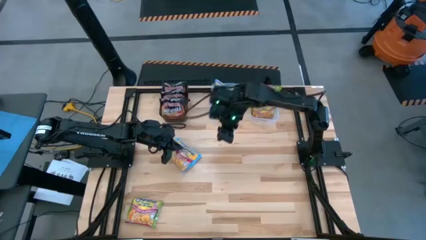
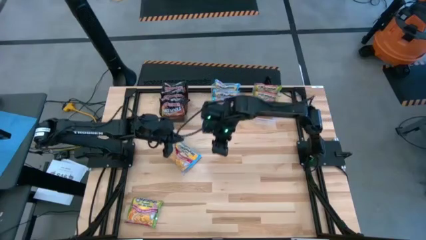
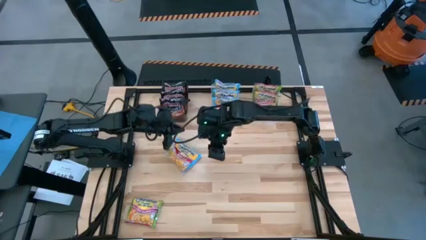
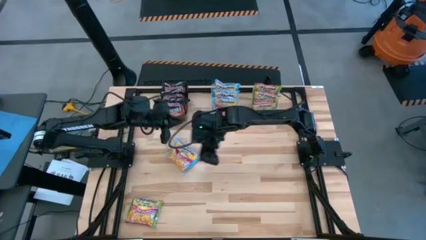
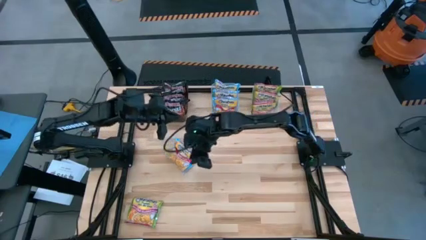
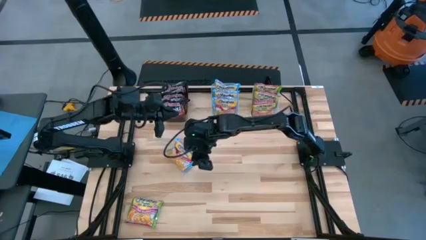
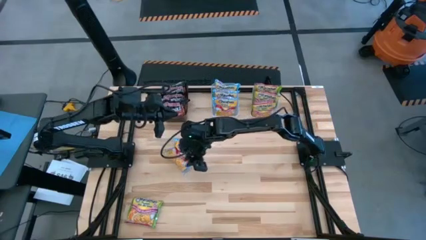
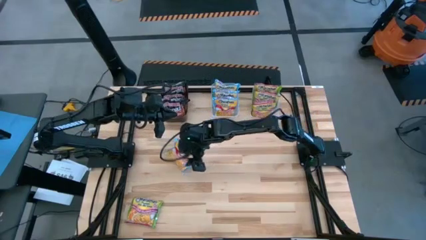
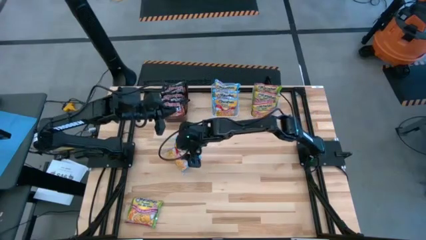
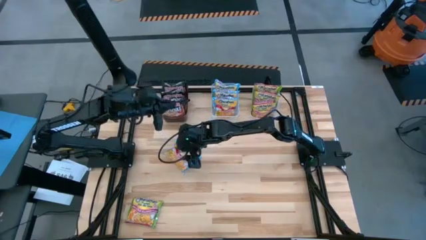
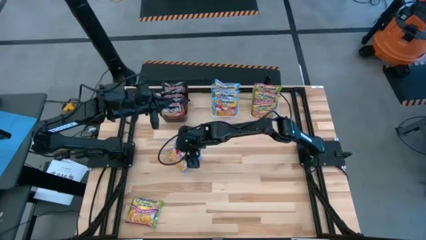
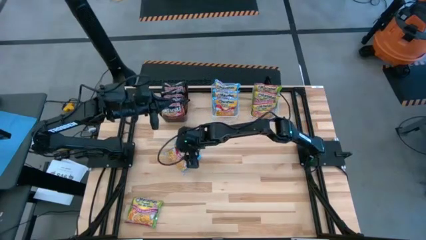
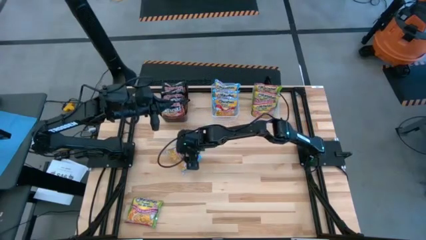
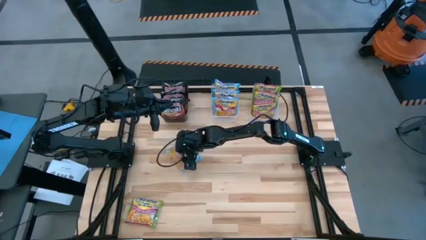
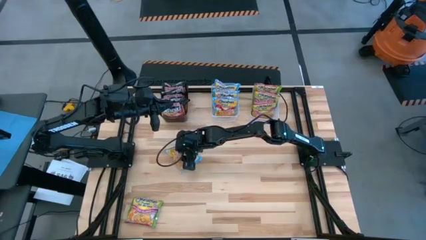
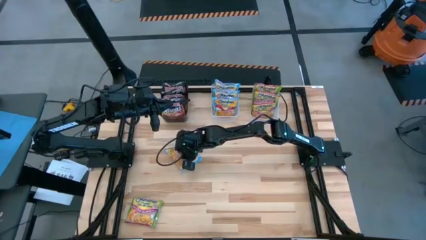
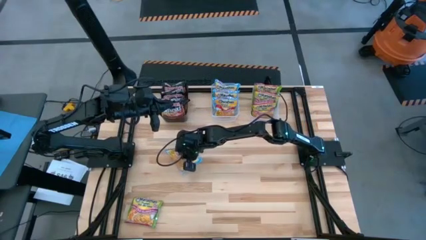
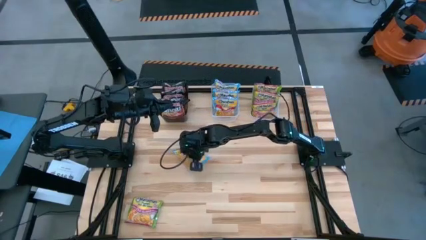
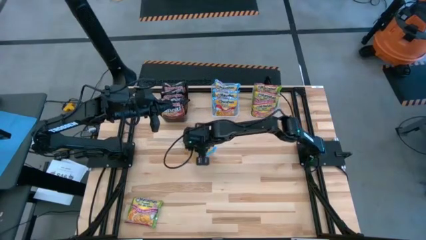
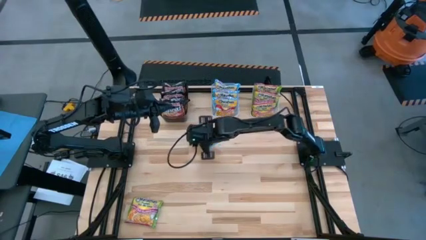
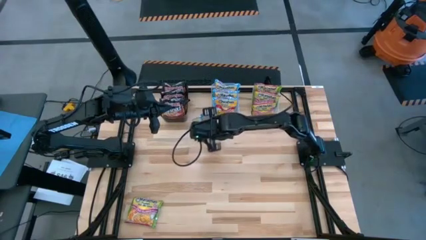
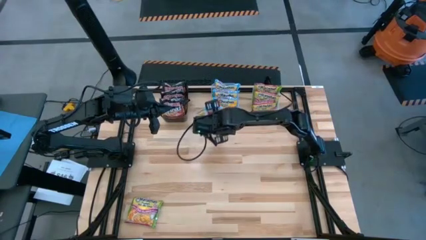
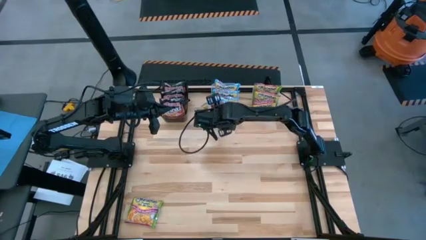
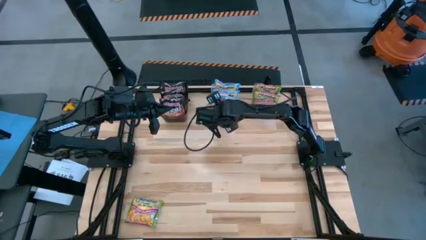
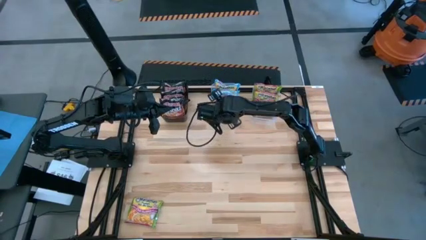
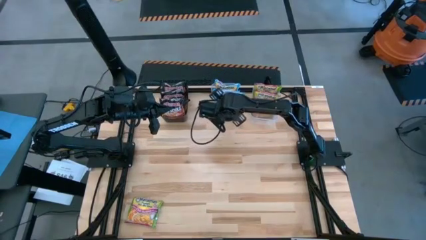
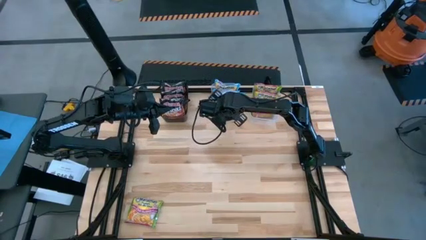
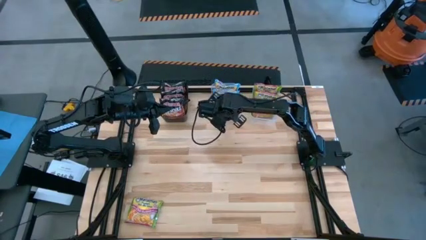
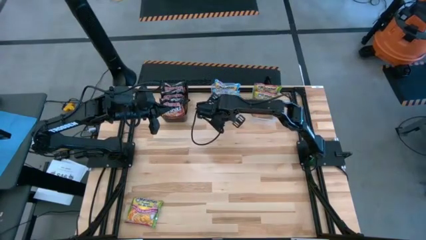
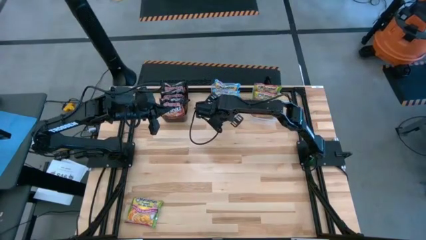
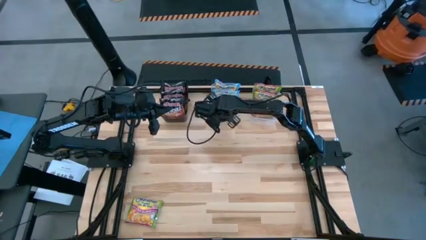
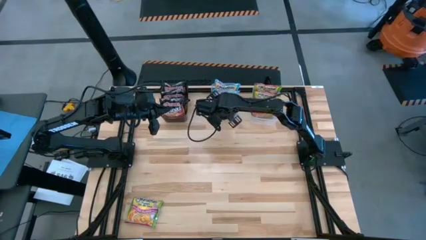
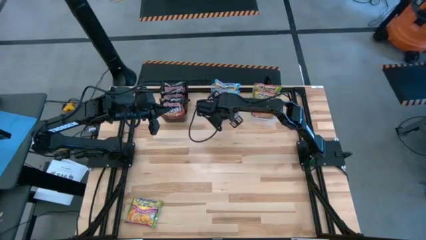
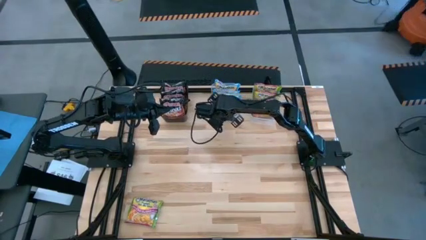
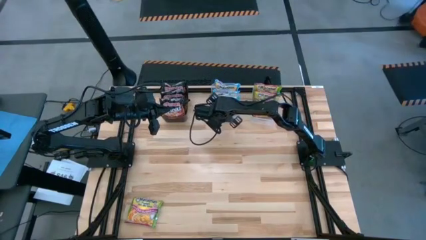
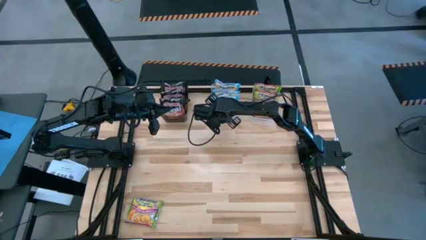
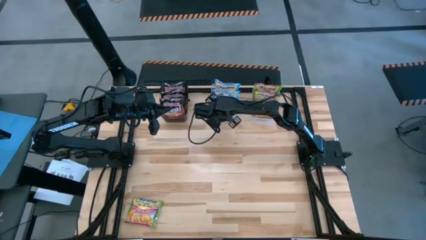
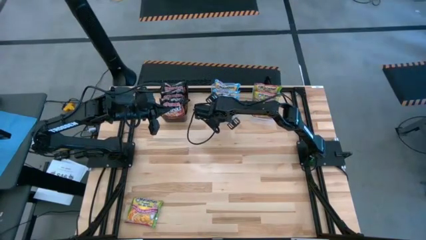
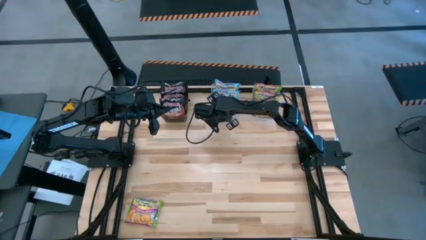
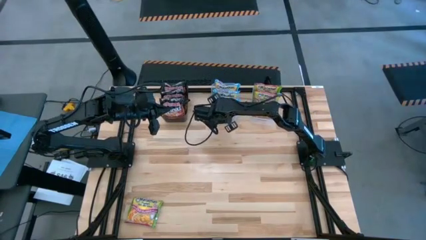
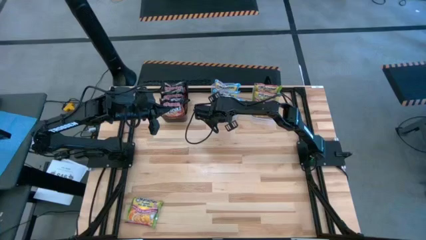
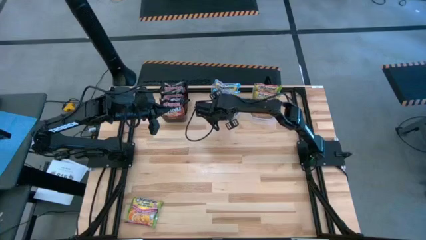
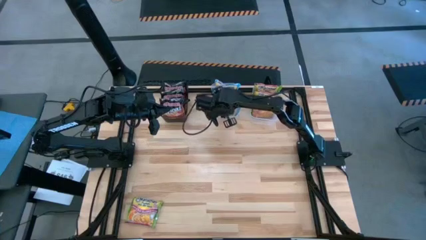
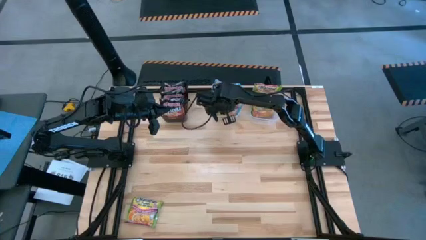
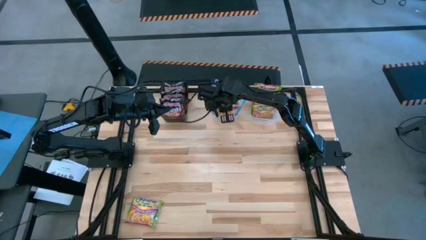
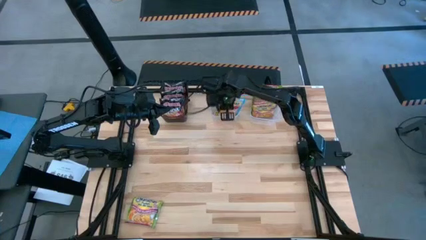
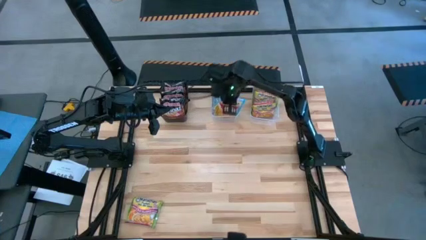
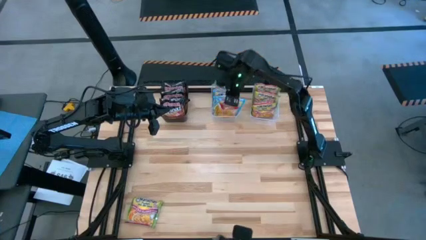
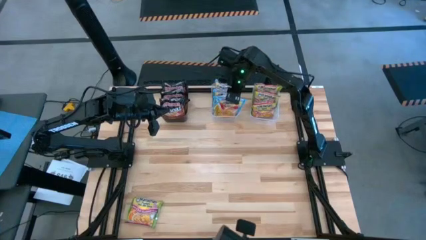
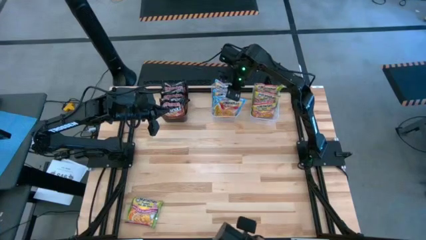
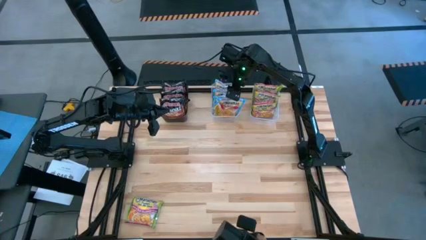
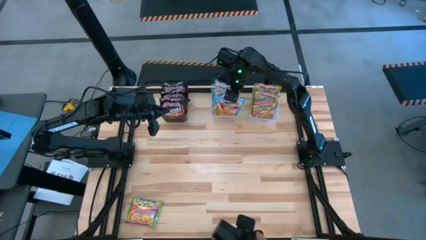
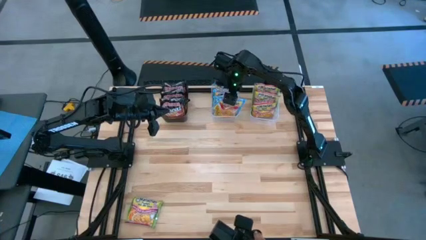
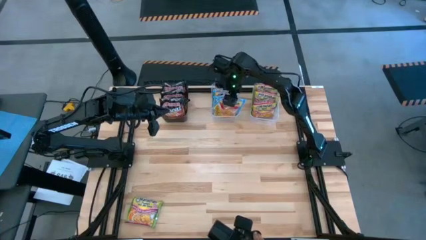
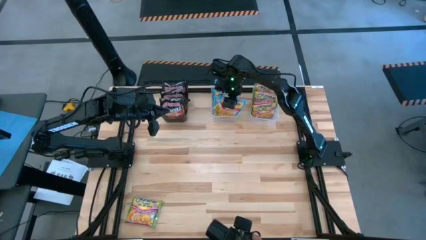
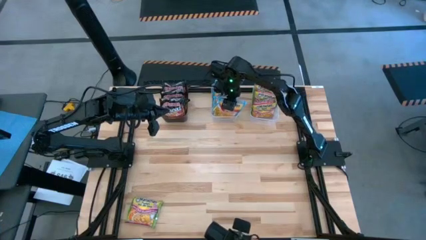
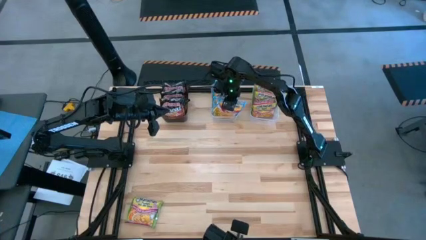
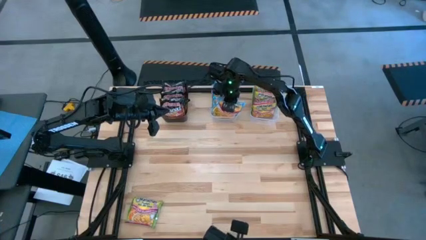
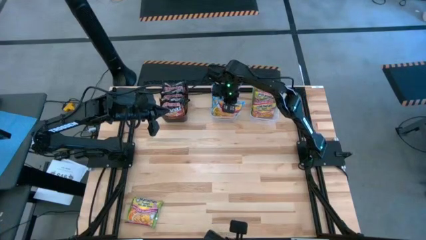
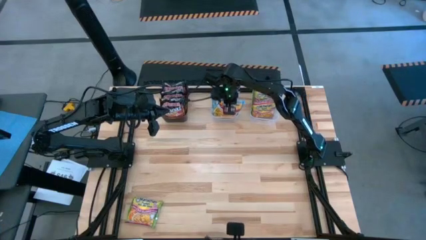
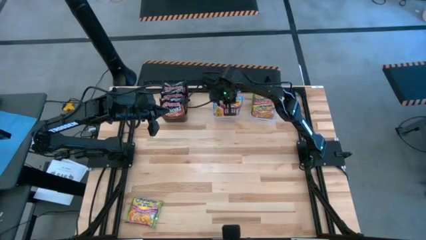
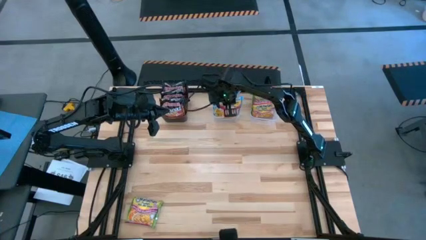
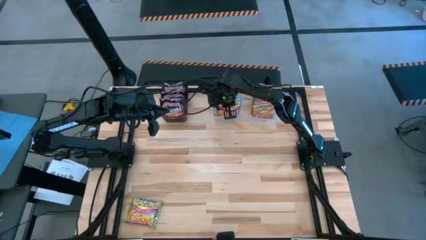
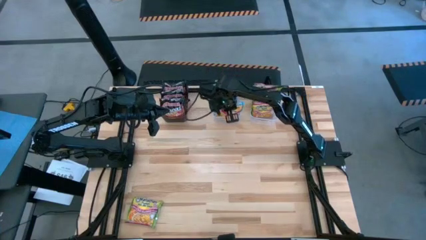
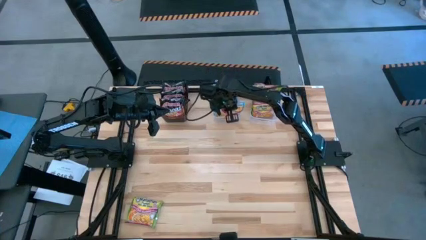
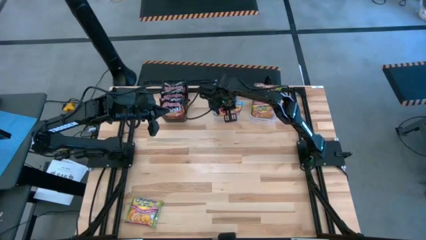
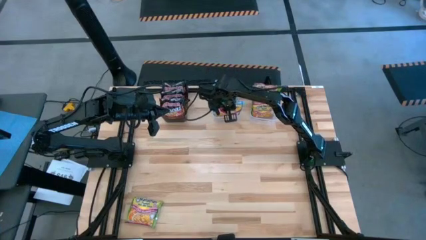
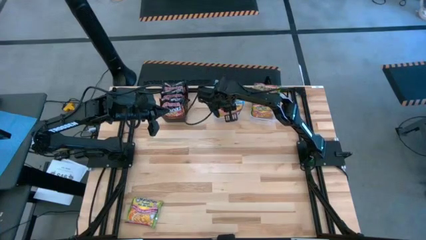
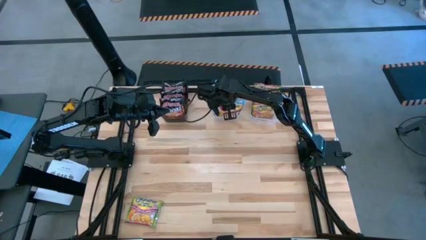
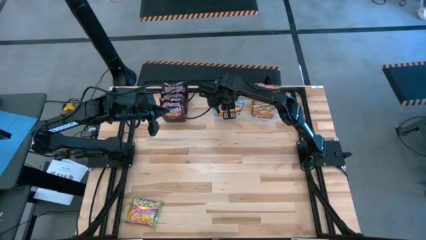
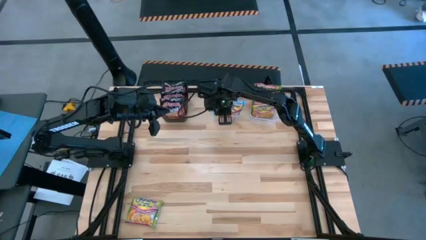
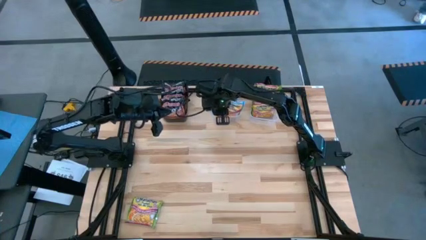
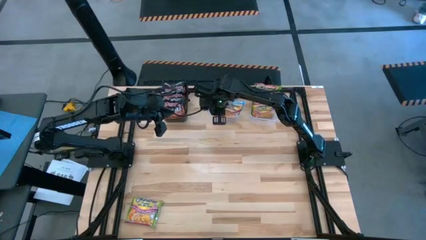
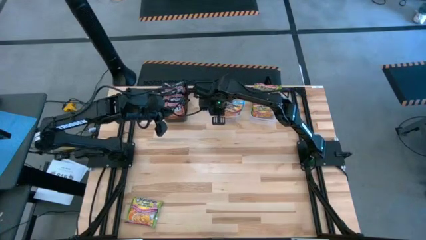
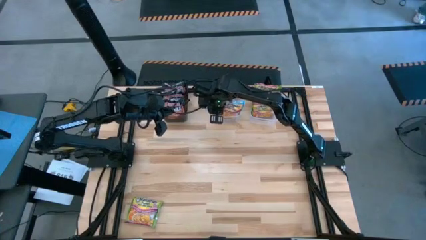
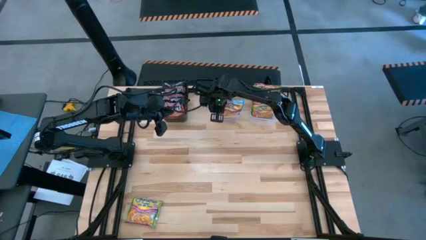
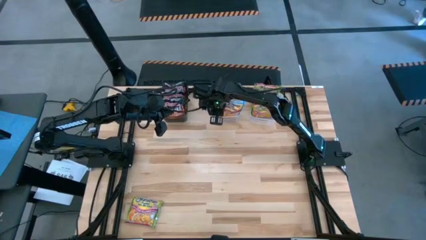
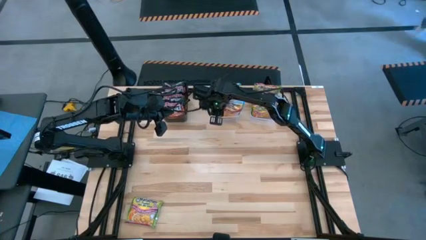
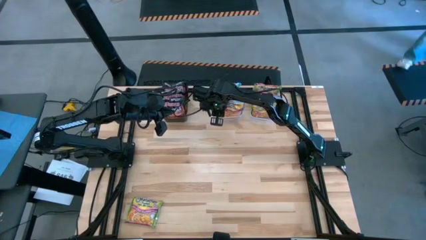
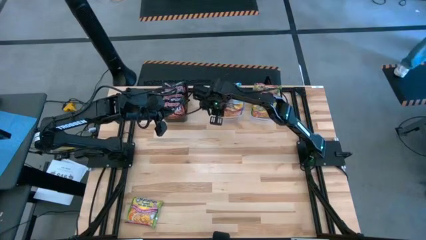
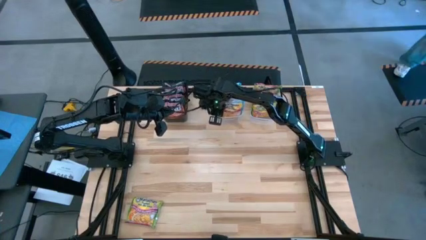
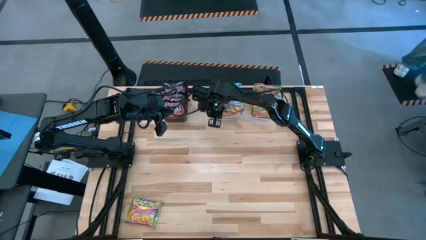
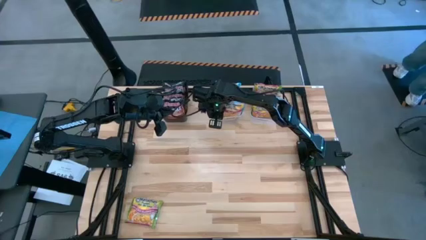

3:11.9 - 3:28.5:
Task: Sort Maruchan noodles
Put the blue noodle pack into the left transparent bin
